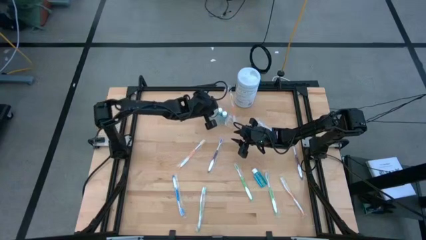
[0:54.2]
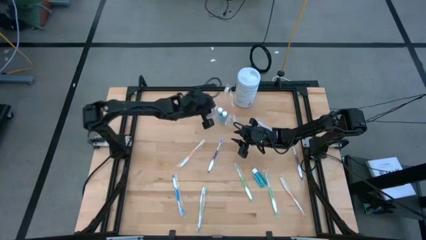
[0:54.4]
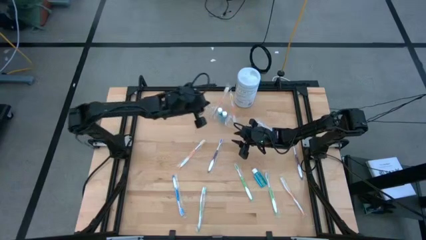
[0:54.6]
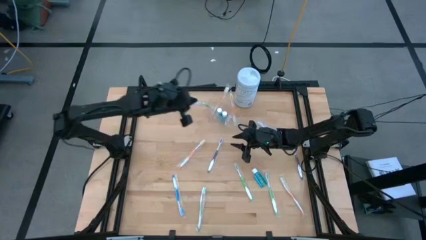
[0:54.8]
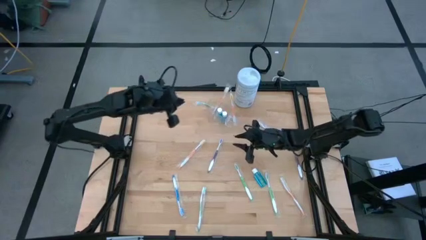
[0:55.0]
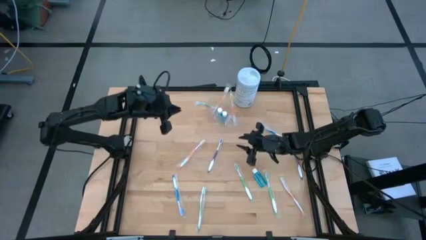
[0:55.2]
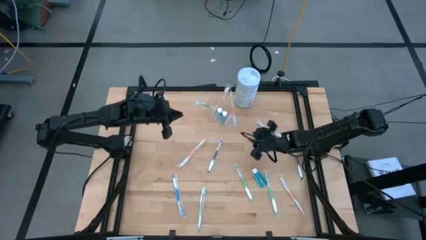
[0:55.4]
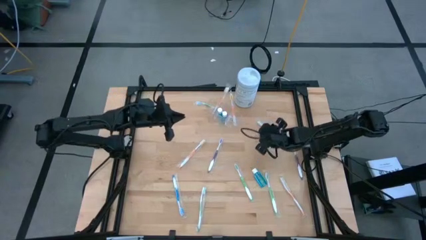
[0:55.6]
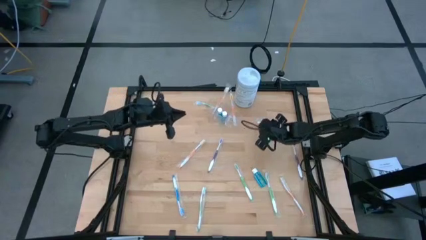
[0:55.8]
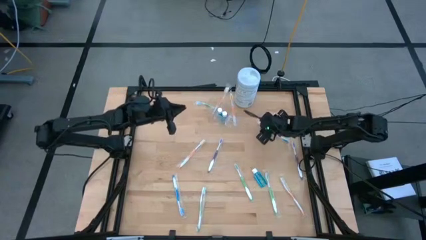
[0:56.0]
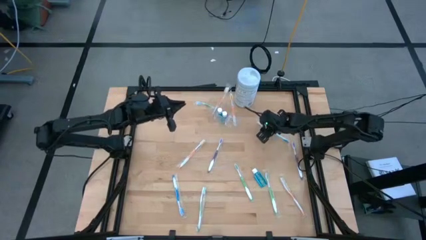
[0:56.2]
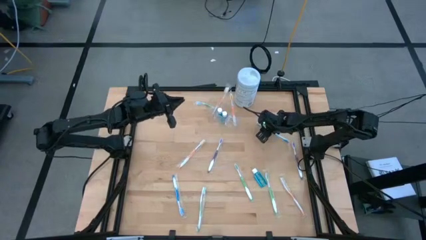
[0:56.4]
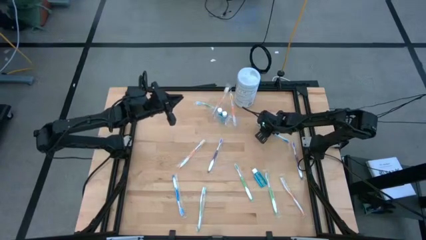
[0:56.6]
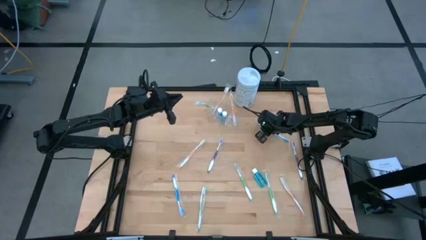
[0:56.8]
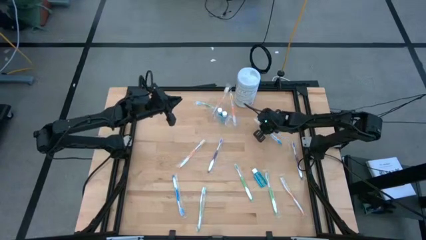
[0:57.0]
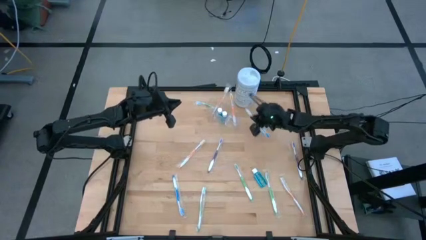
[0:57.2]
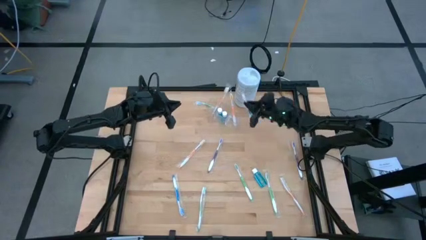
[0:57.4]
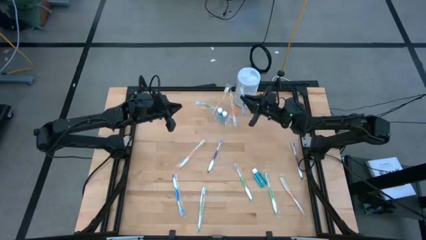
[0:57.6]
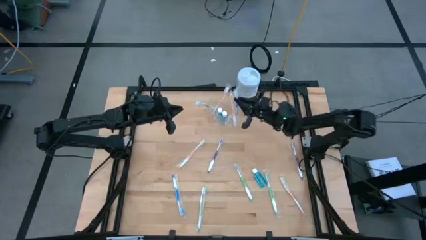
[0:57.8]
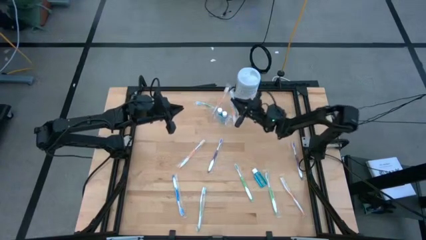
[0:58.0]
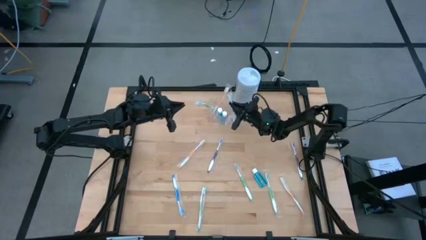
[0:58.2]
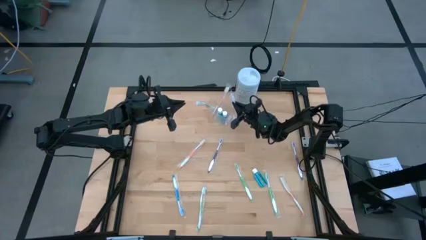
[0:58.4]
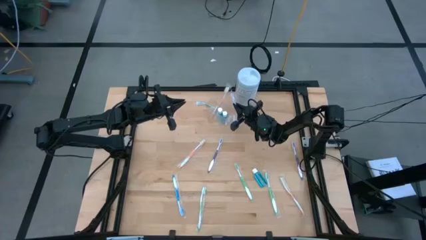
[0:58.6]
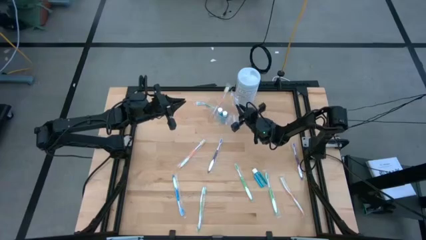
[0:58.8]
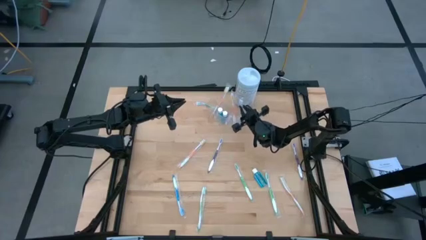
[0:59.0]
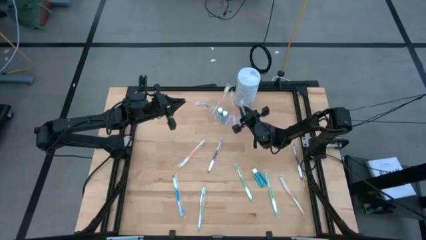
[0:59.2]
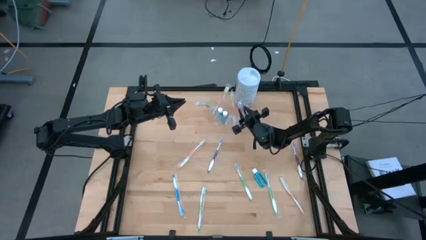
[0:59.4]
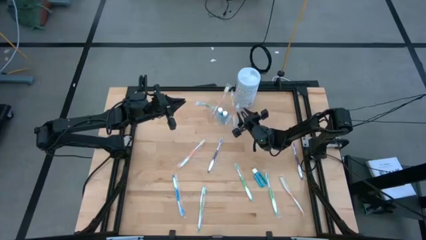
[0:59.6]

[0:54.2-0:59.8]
Task: Pick & Place toothbrushing station
Put the blue toothbrush into the transparent organizer

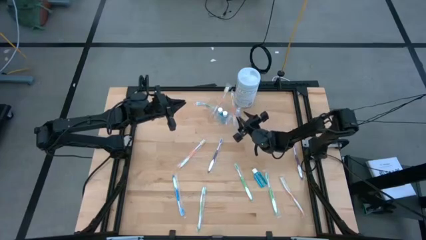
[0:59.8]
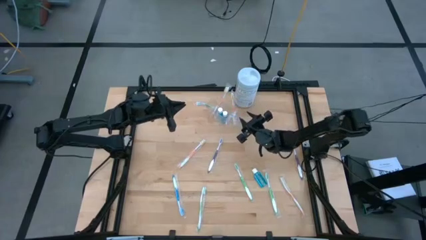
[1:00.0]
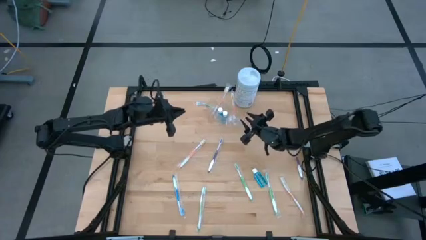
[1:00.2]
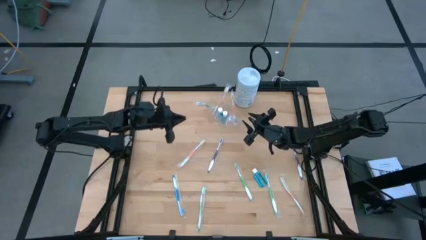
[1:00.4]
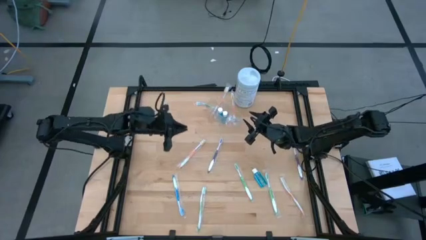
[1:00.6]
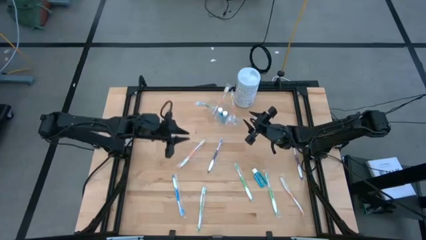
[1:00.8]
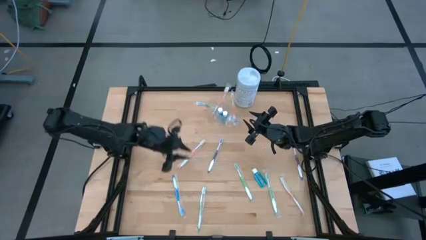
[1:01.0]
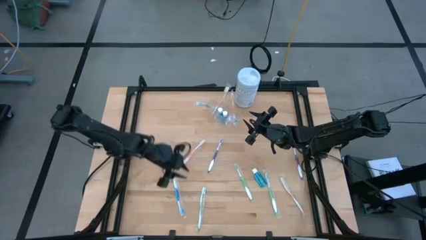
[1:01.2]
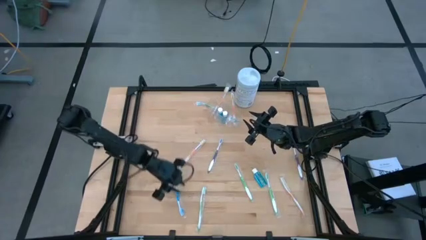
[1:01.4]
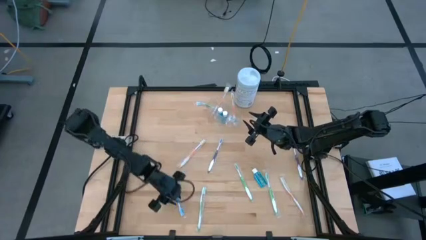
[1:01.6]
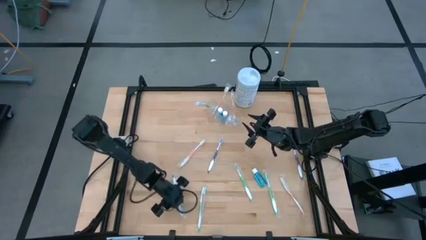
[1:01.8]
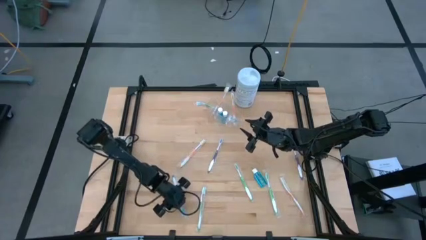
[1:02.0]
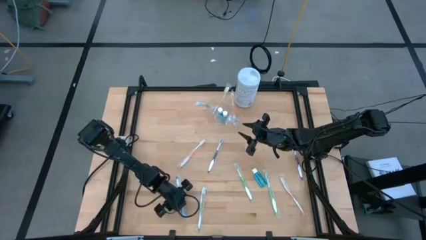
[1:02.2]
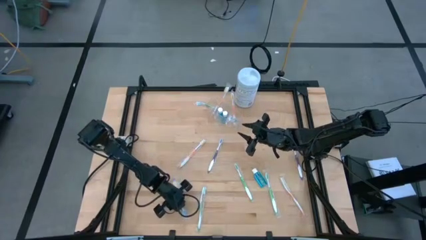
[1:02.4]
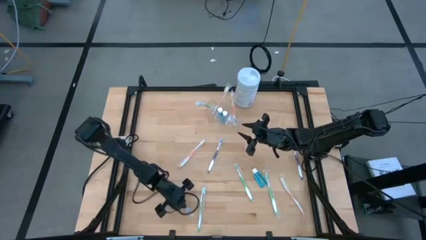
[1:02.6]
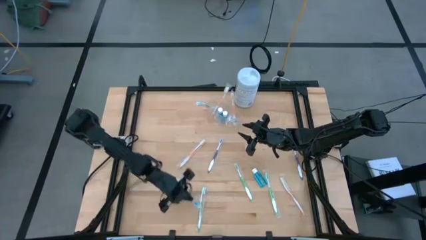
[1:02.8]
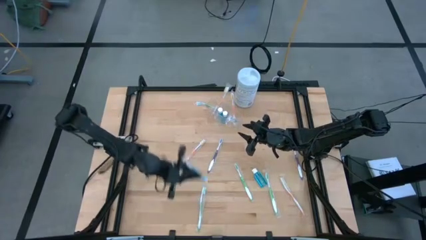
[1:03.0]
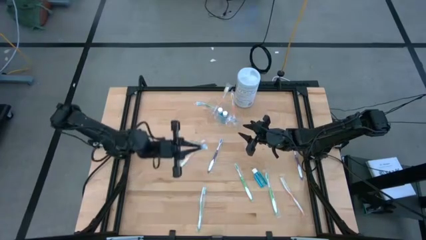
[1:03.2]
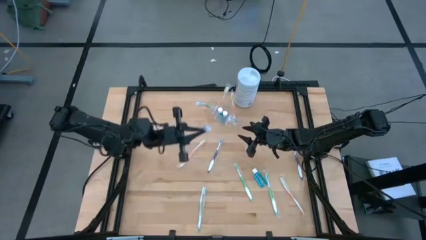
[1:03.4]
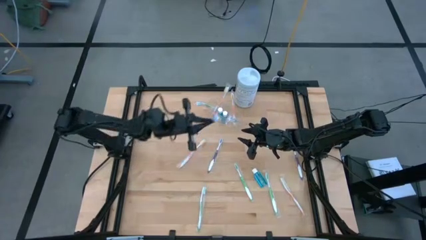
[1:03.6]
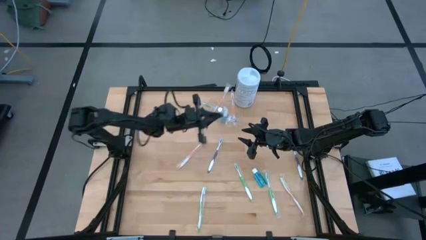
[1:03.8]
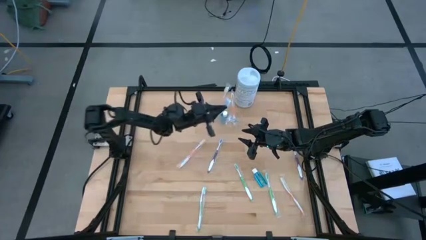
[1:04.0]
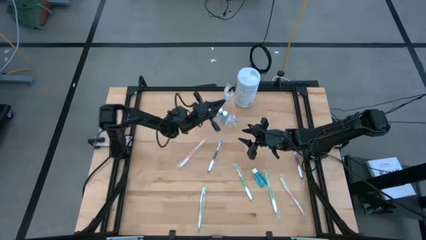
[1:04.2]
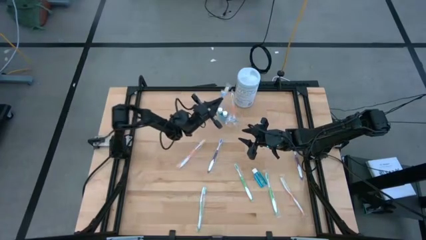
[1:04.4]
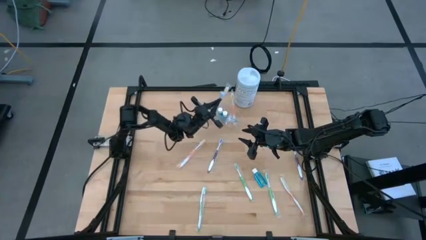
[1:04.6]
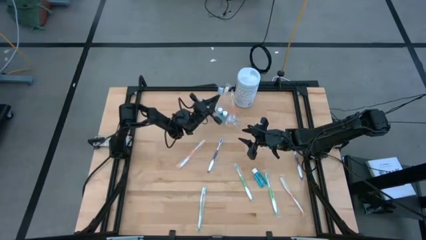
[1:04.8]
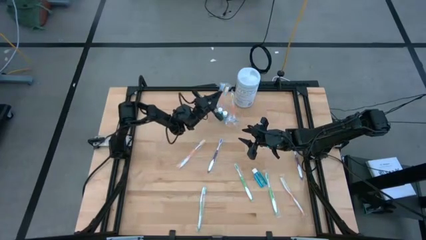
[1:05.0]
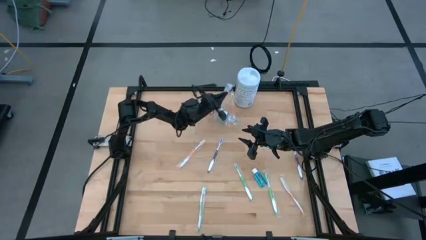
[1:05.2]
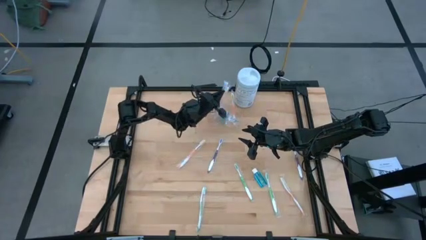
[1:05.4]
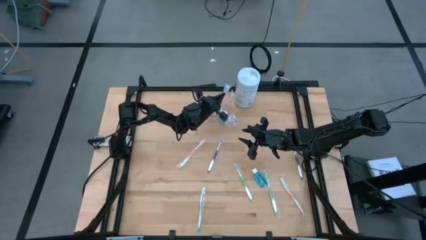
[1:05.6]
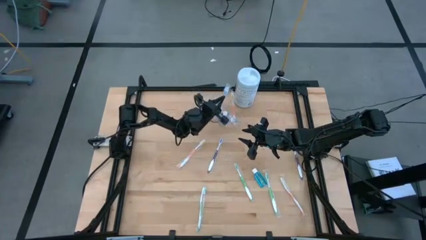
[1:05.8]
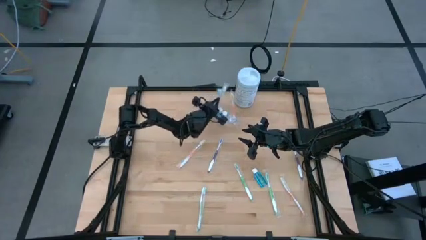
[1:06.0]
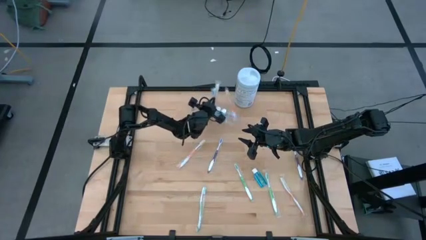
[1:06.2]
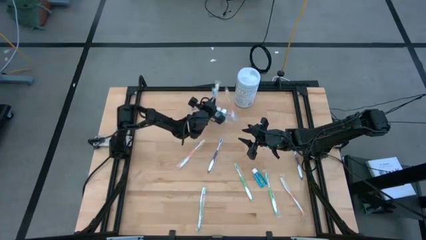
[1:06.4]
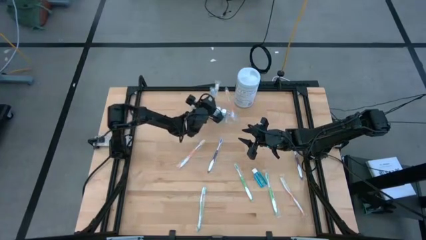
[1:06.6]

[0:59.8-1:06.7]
Put the blue toothbrush into the transparent organizer

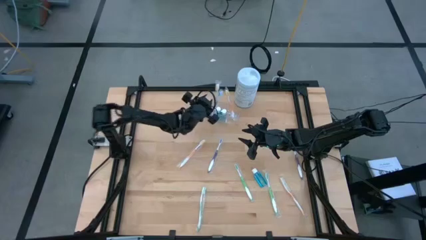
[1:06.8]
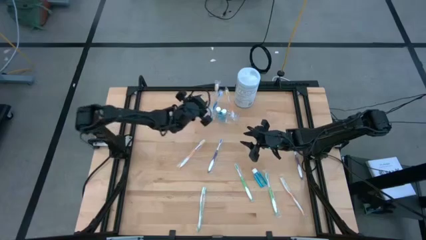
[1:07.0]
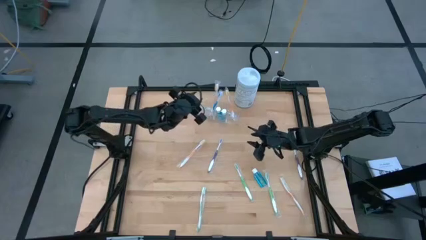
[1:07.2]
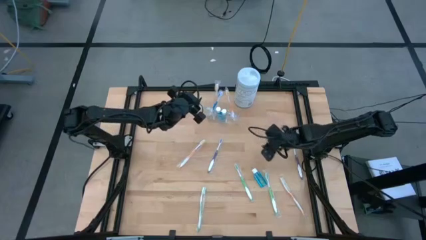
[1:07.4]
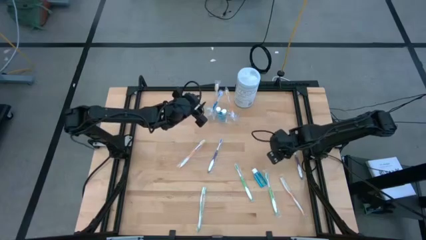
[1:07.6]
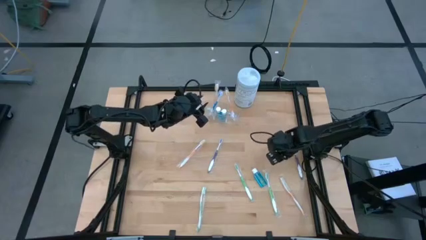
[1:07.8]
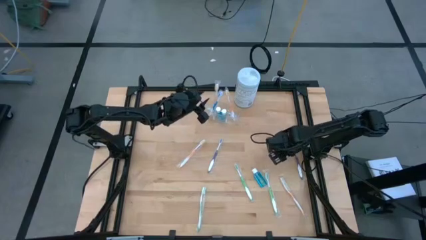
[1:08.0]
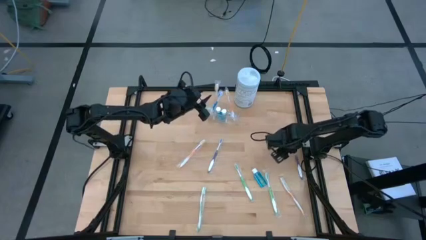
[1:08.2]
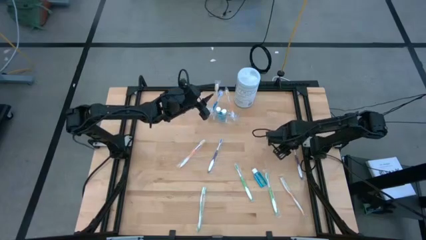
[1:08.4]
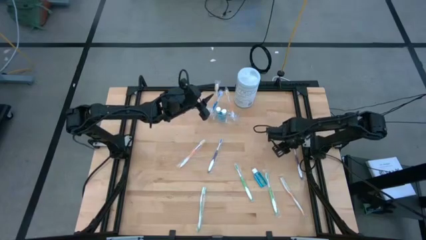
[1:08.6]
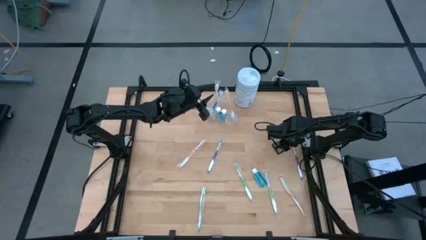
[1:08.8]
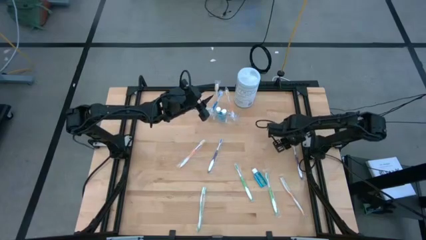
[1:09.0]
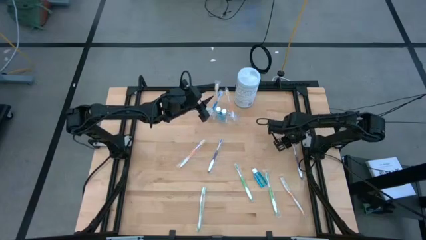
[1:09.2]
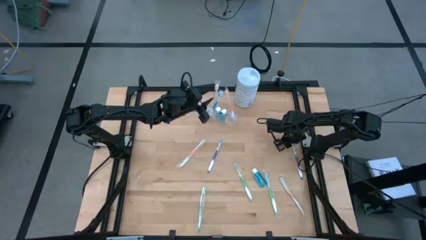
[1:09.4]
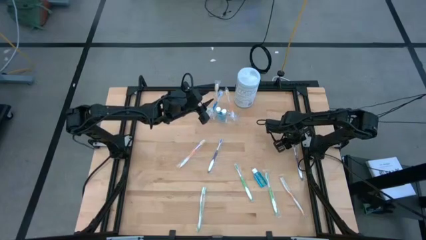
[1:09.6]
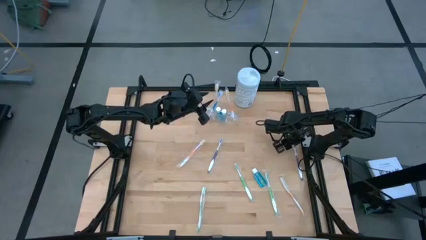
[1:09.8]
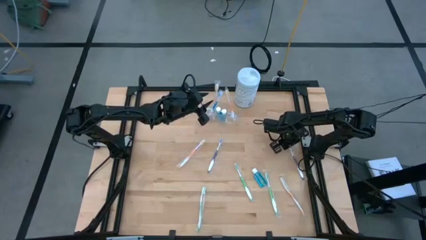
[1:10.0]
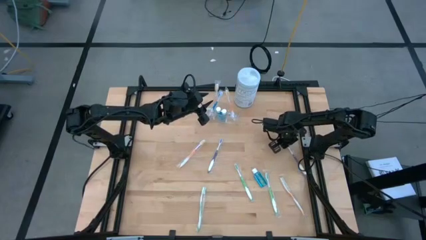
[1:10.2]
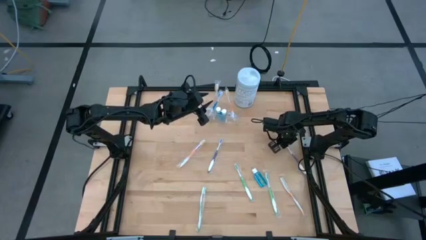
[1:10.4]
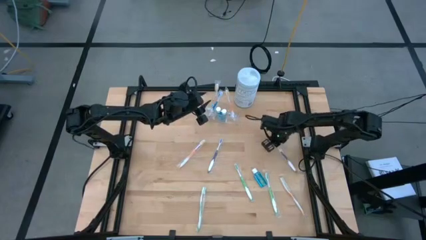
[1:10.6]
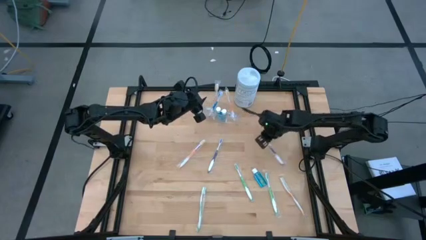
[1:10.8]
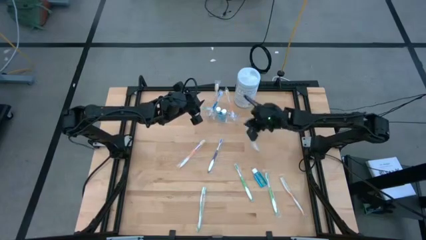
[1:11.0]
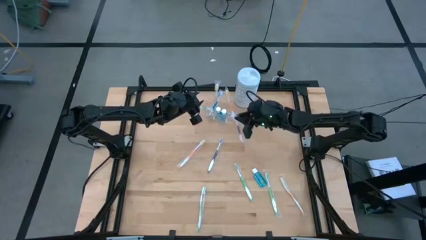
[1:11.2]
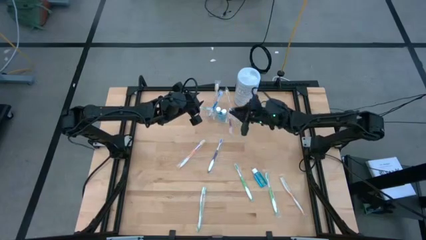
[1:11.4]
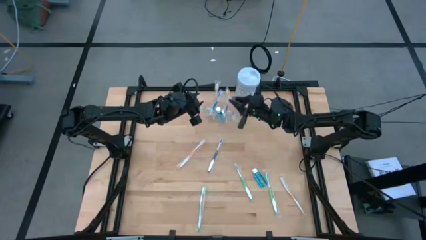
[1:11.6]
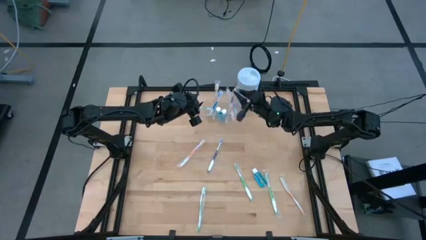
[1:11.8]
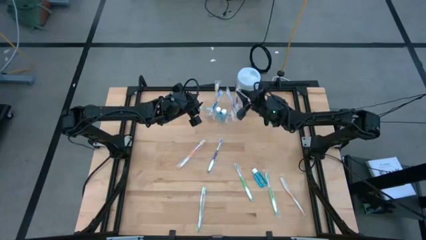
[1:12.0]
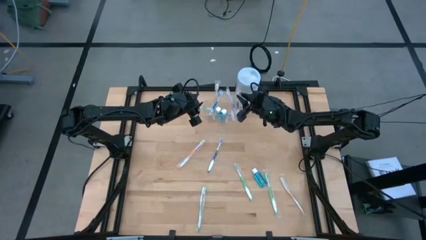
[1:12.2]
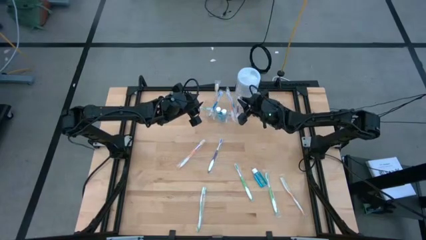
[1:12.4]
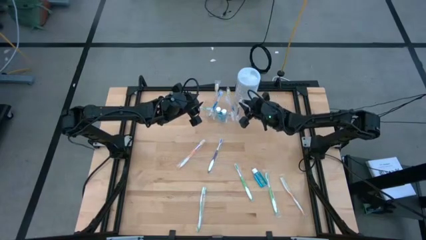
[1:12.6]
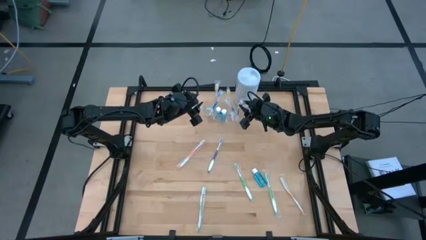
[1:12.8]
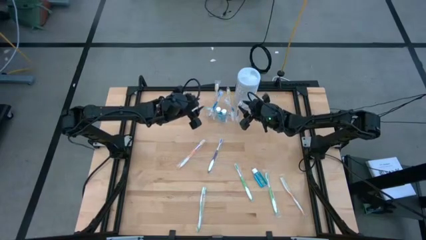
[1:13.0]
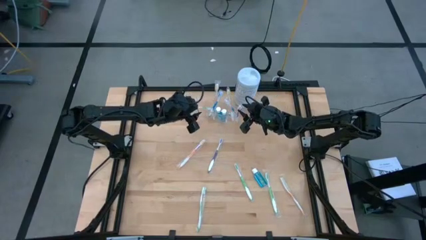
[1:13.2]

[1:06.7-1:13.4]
Put the purple toothbrush into the transparent organizer
